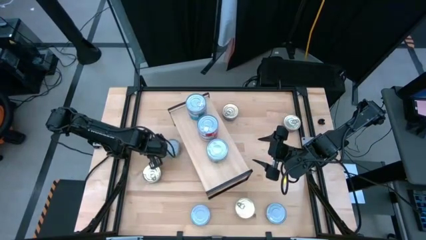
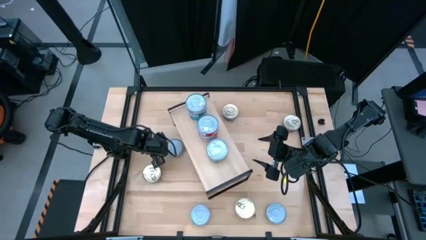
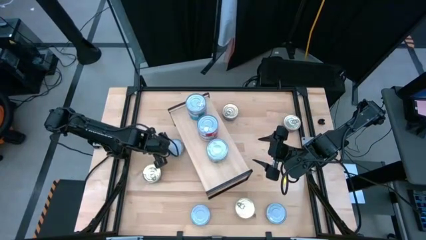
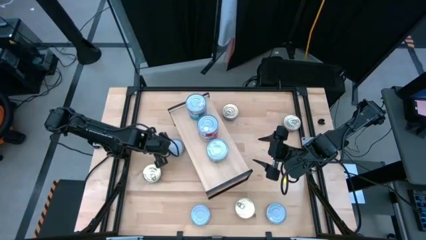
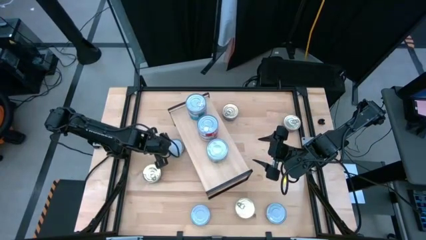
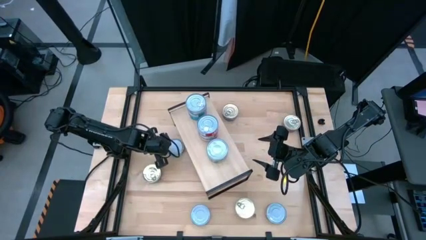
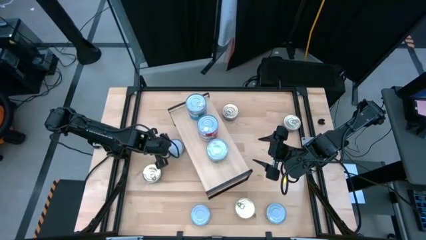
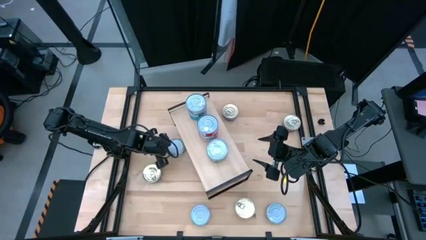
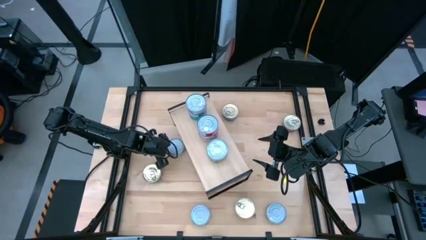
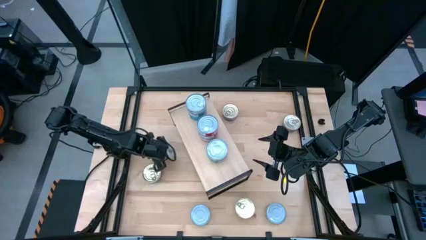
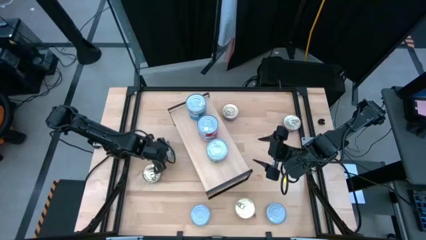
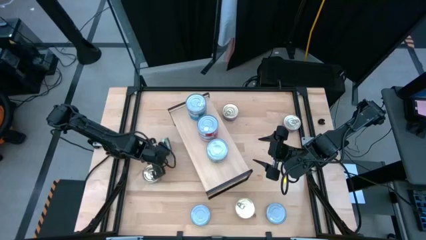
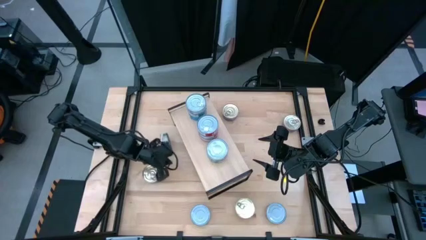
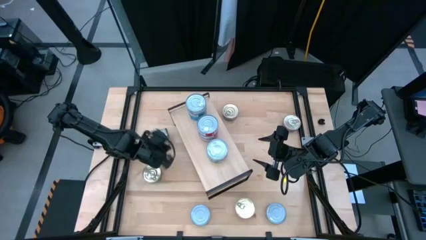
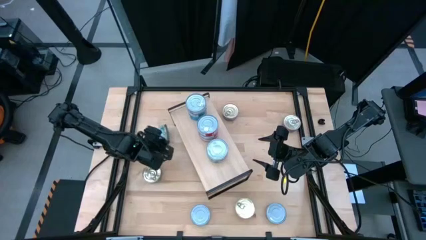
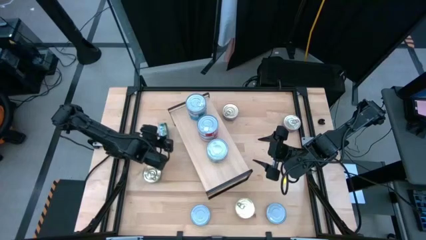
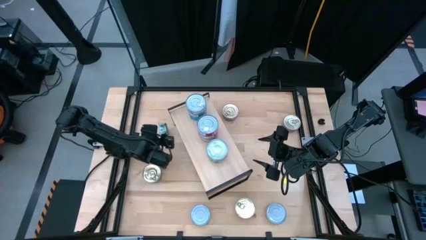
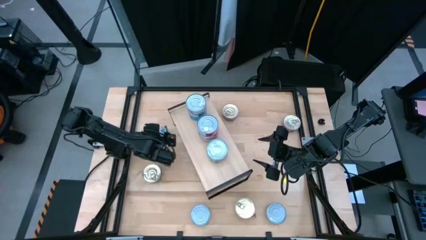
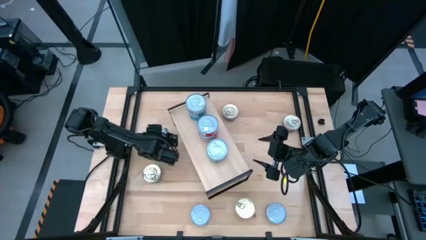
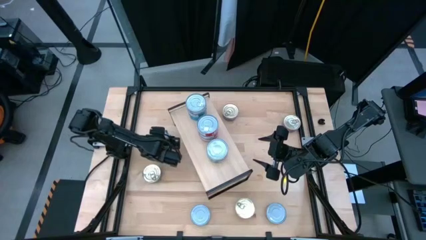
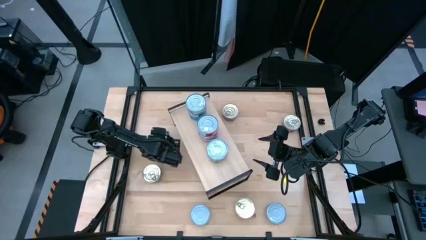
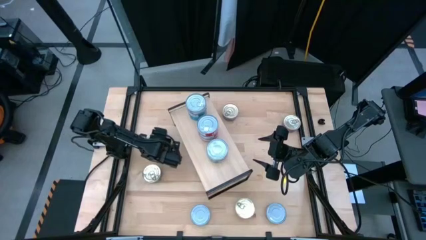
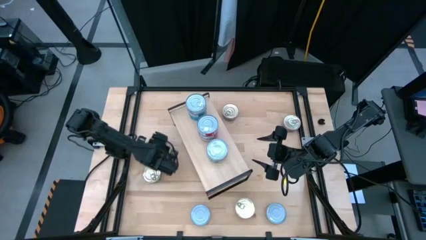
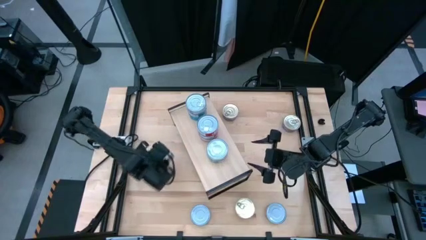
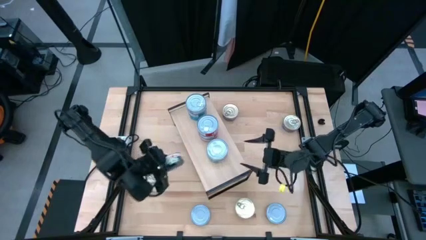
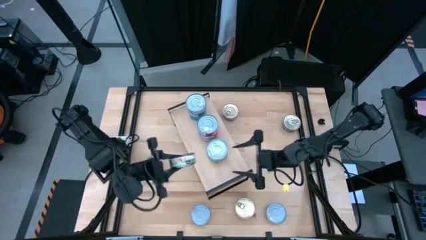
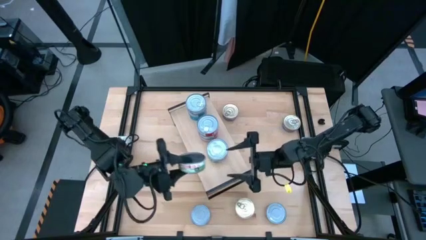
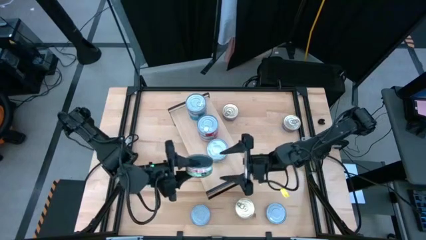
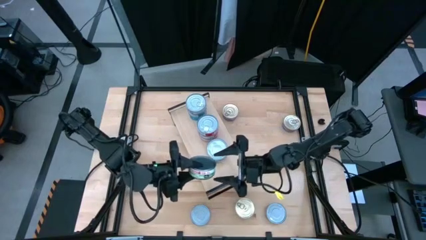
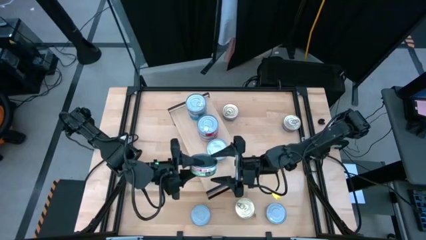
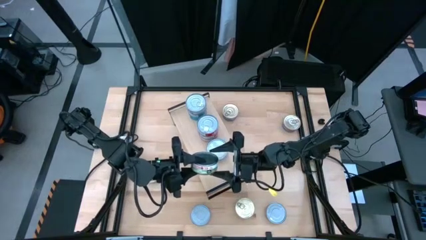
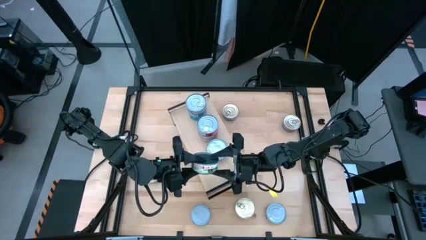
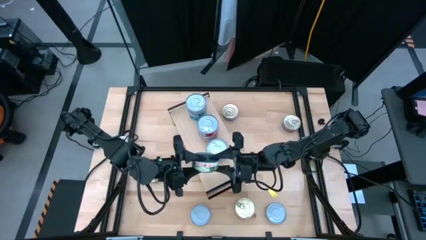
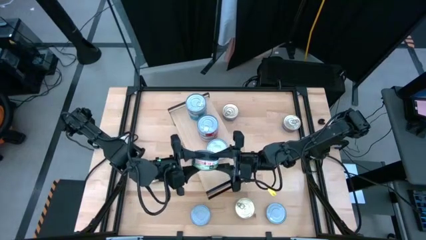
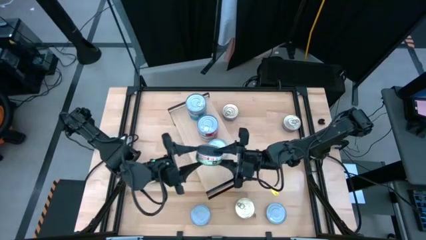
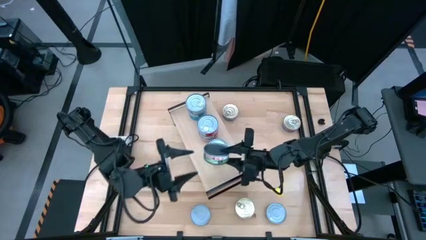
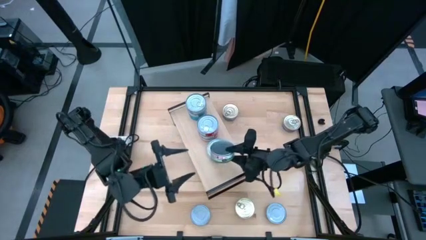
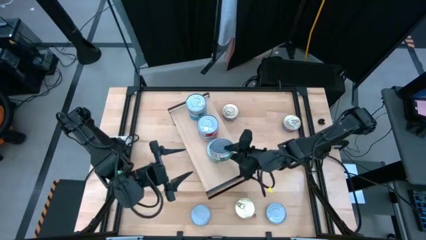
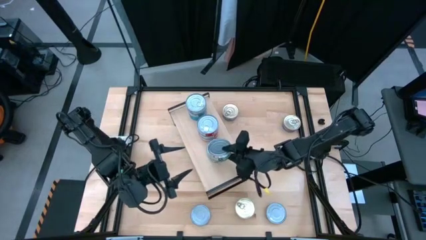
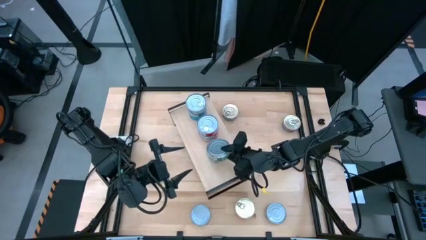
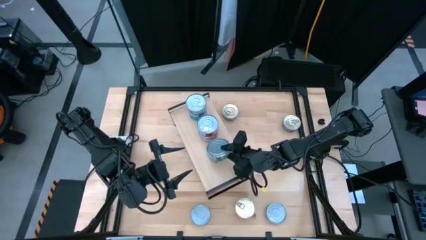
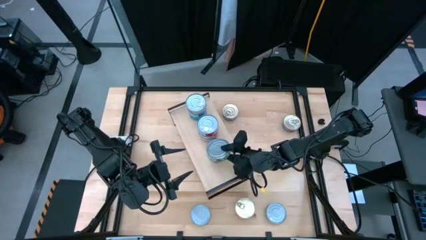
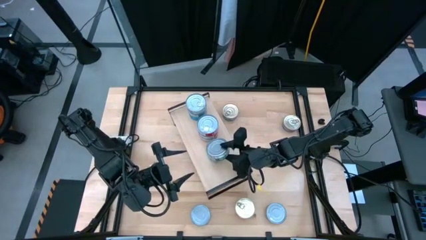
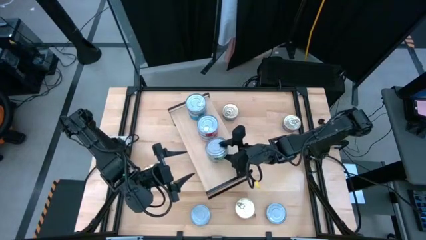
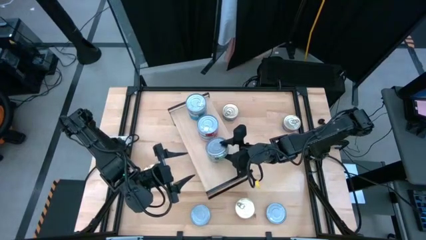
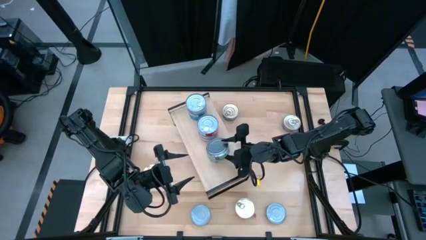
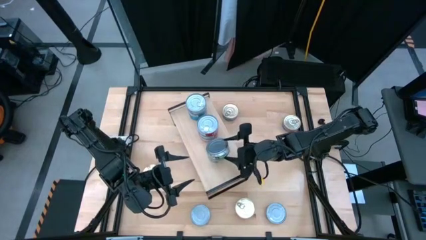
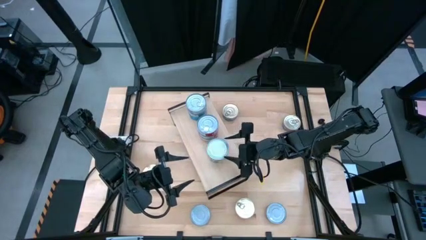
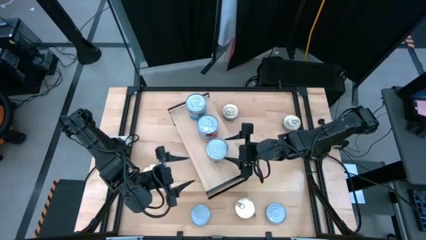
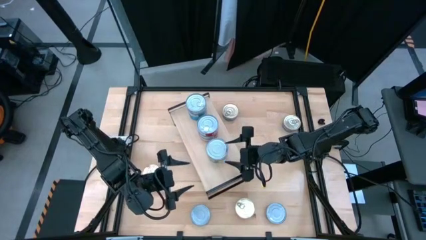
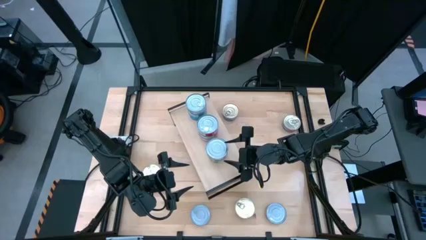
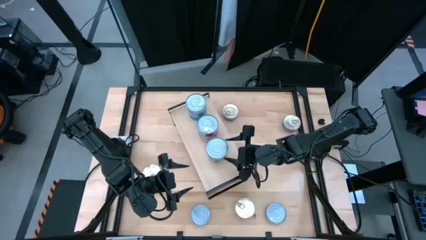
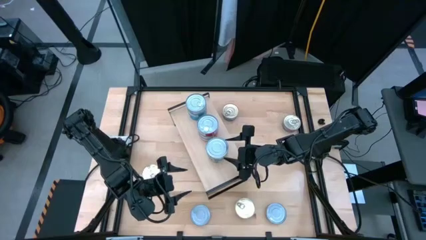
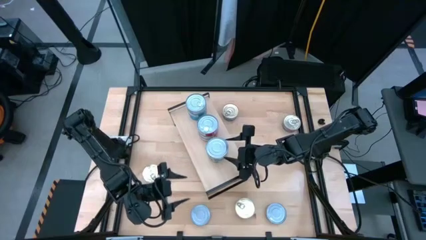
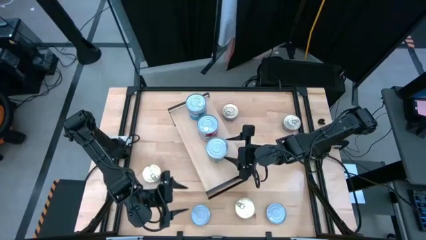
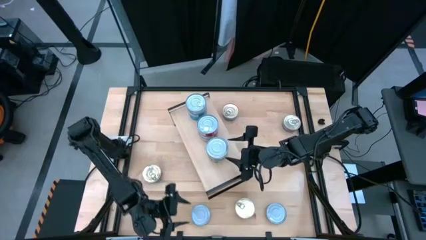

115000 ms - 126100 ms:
Task: Stack canned seafood by type on shelf
Stack the green tuna can on top of the green tuna cans on the shelf

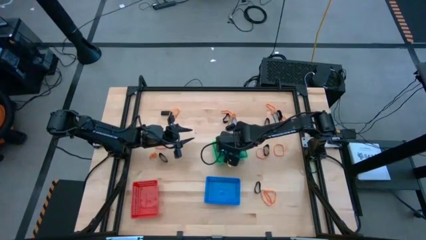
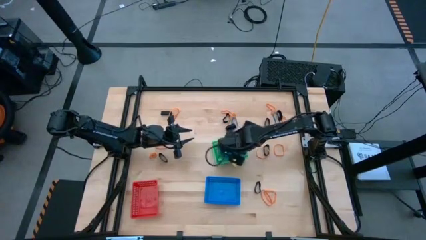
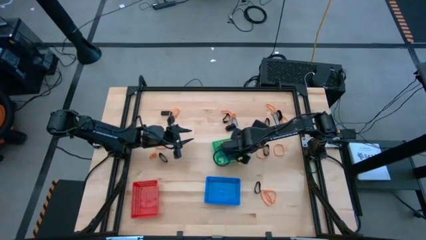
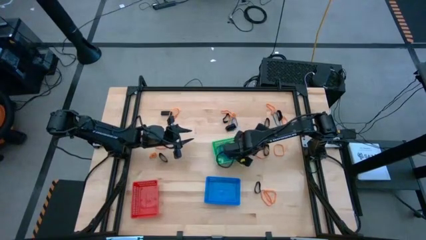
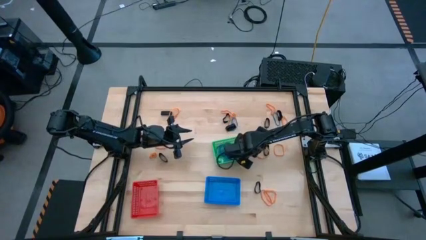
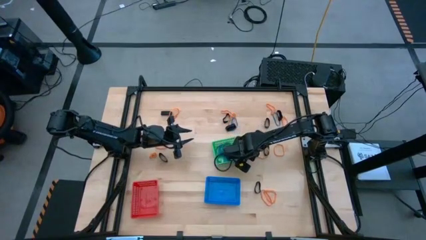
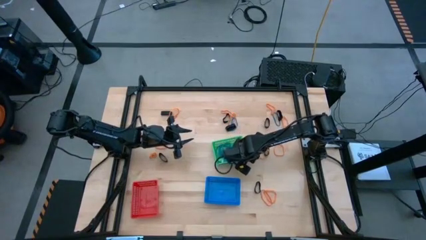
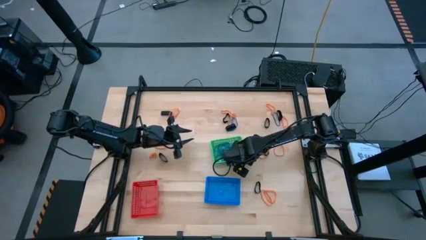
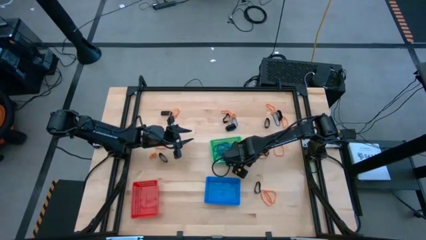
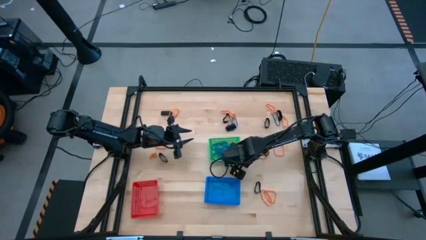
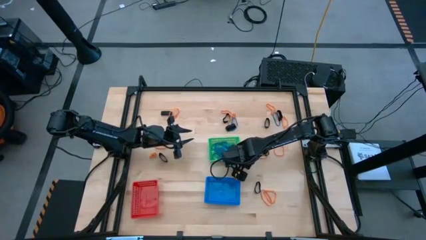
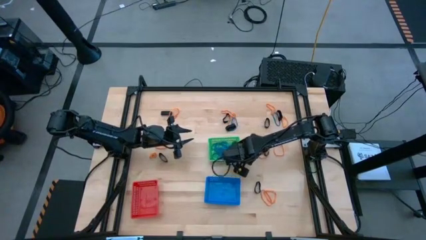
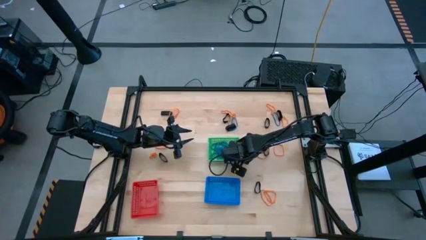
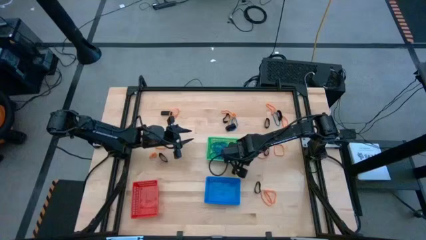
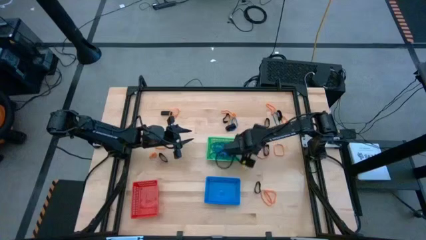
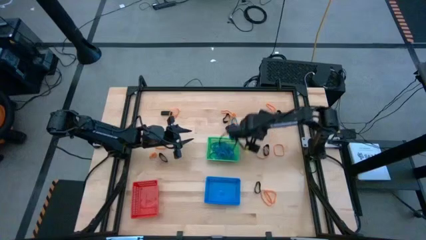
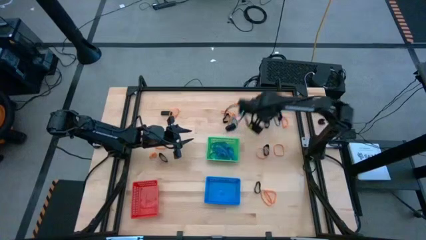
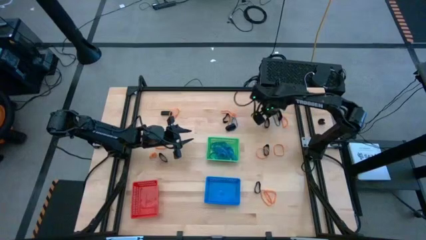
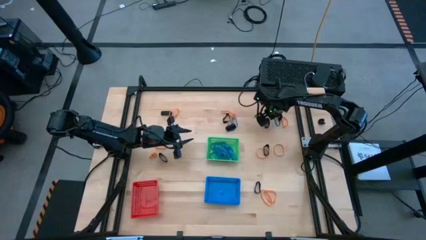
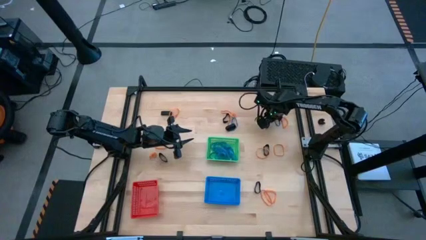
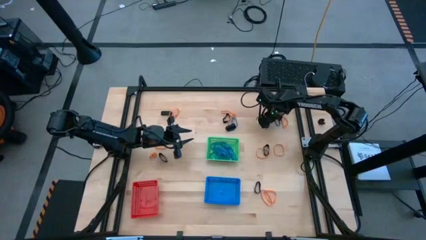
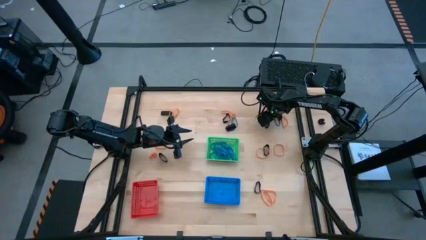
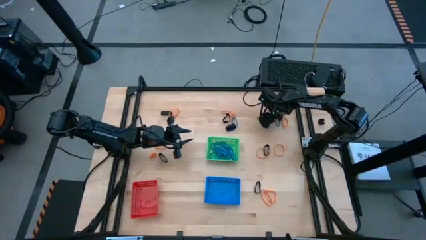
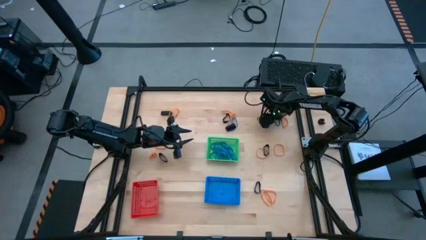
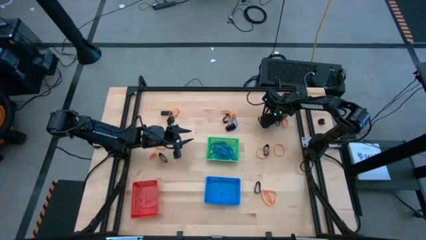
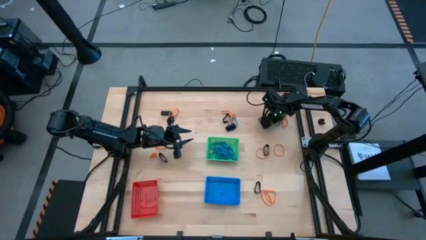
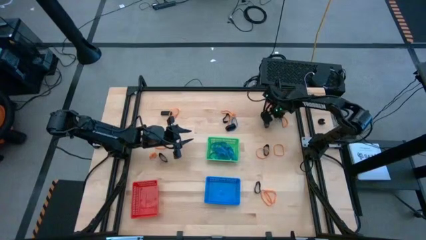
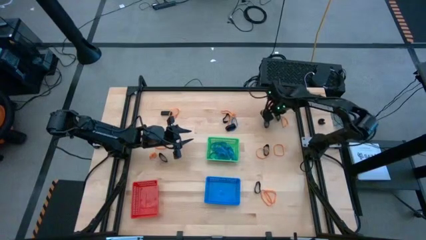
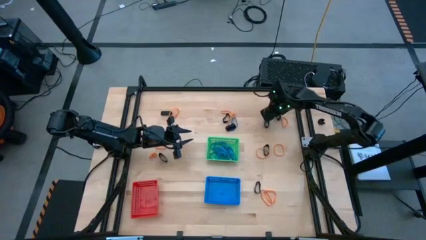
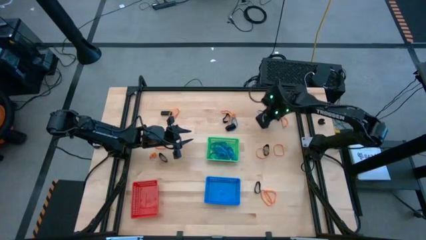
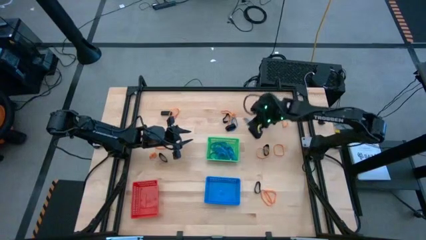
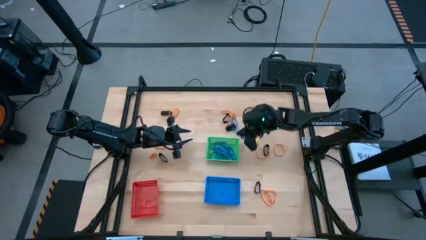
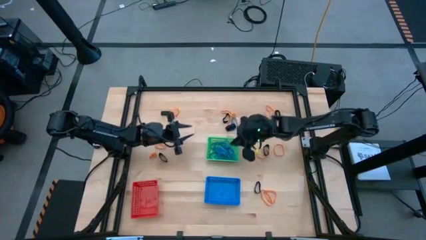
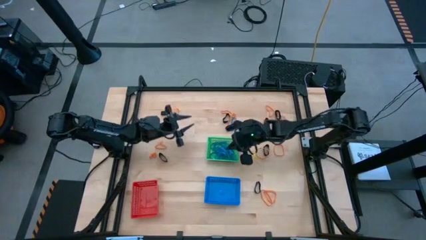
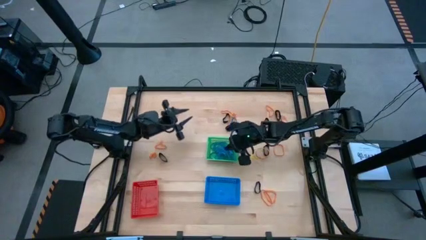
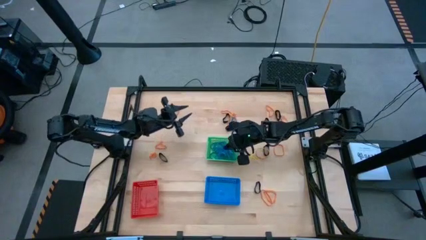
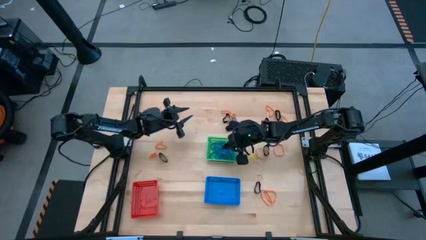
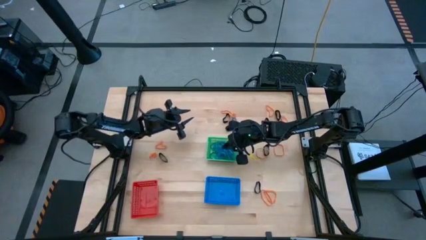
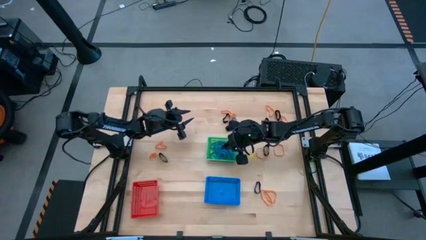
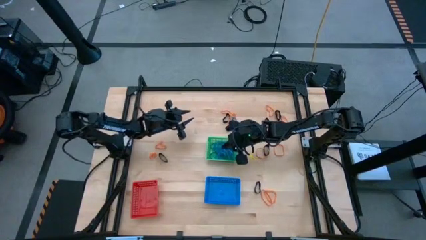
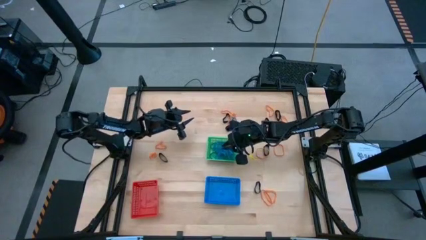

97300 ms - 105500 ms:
Task: Sort rubber bands into baskets
Put the blue rubberband into the green bin
